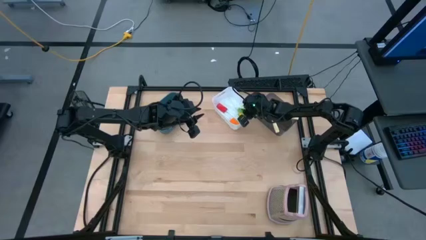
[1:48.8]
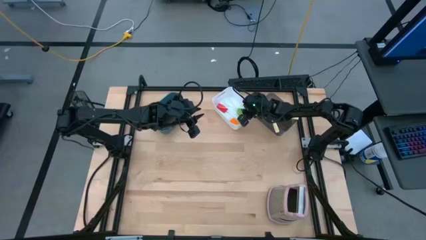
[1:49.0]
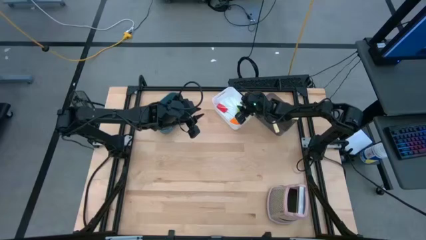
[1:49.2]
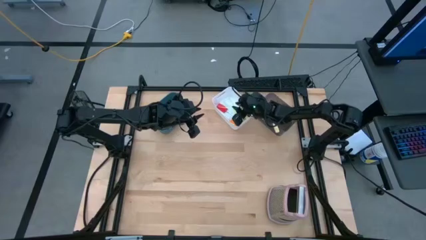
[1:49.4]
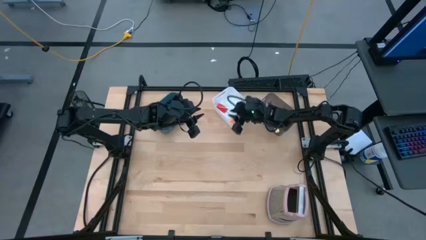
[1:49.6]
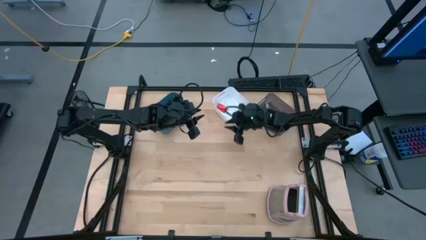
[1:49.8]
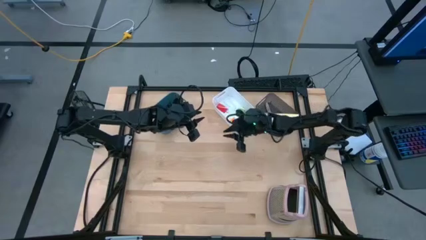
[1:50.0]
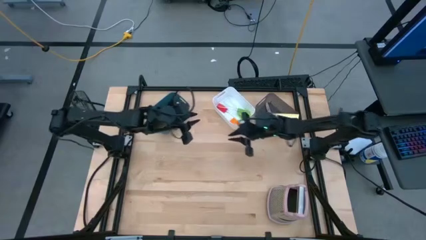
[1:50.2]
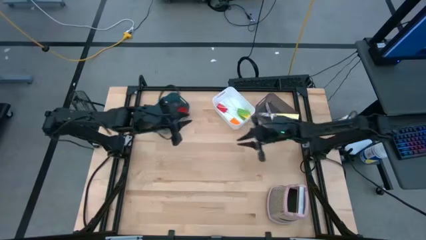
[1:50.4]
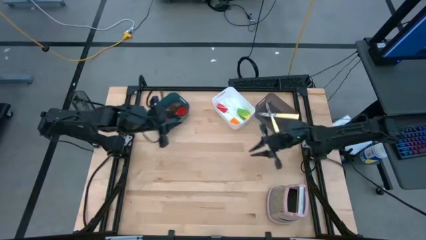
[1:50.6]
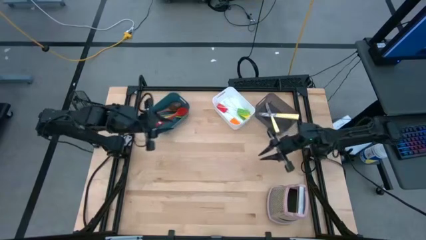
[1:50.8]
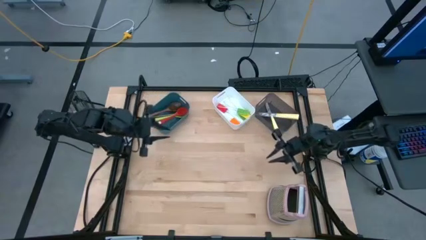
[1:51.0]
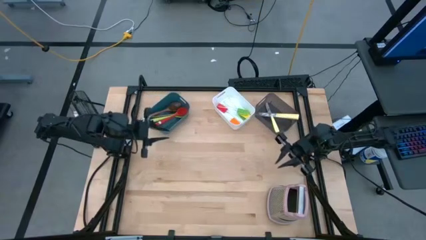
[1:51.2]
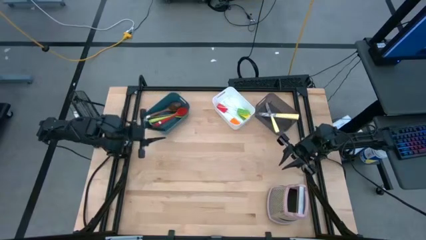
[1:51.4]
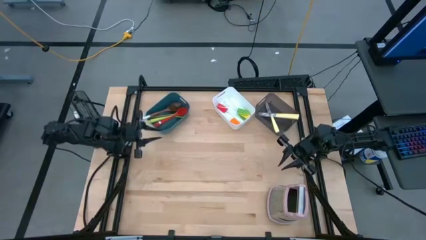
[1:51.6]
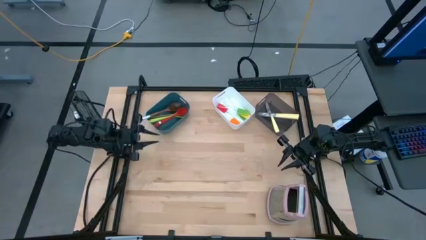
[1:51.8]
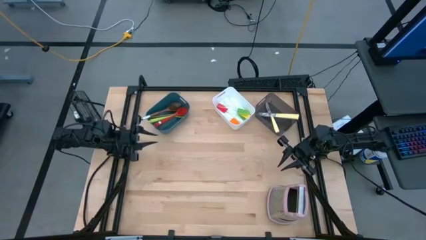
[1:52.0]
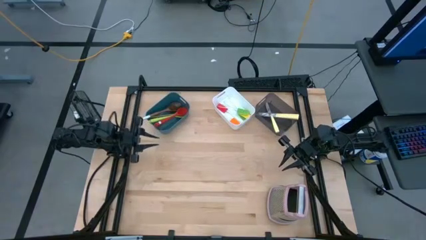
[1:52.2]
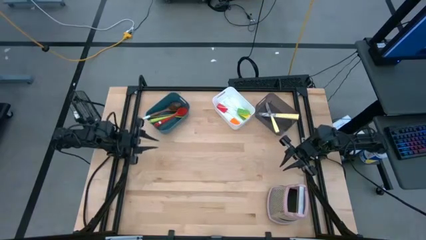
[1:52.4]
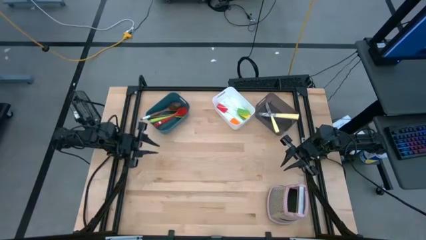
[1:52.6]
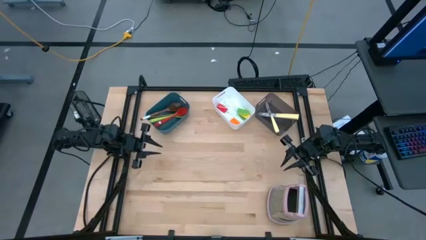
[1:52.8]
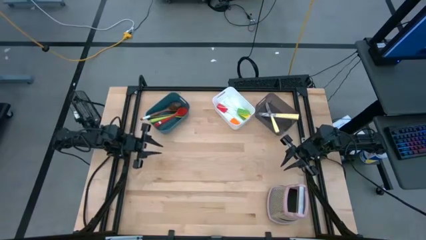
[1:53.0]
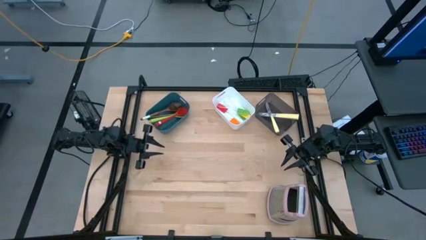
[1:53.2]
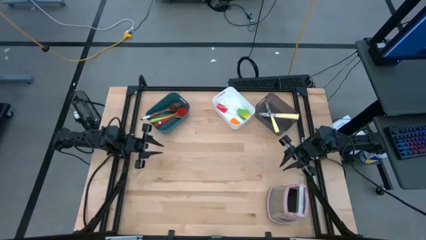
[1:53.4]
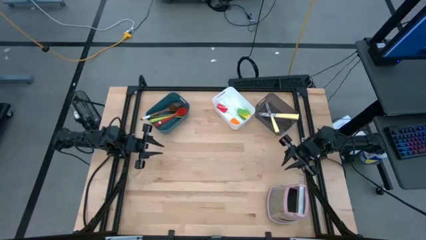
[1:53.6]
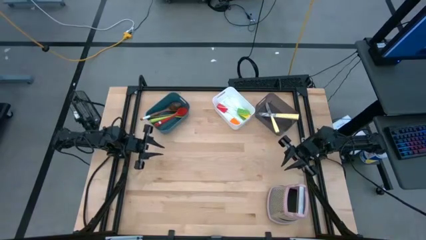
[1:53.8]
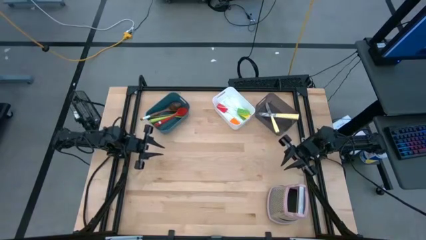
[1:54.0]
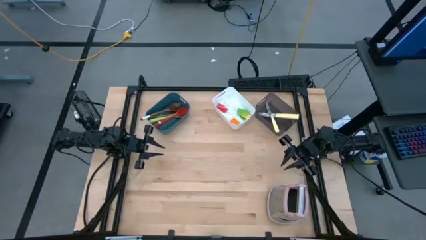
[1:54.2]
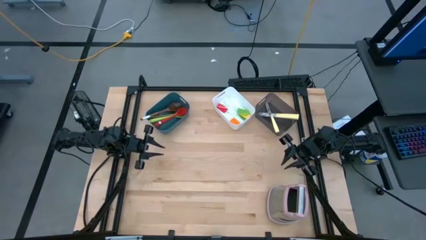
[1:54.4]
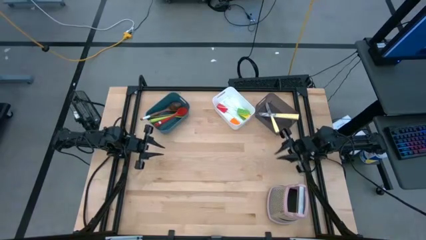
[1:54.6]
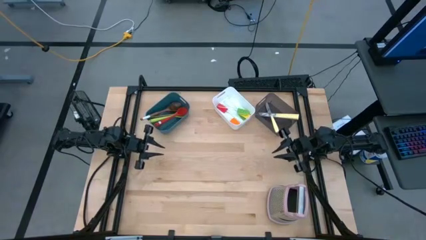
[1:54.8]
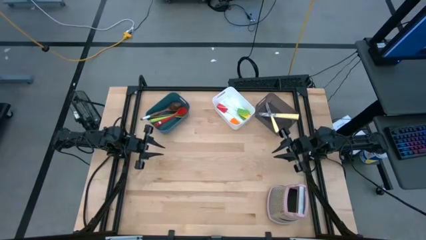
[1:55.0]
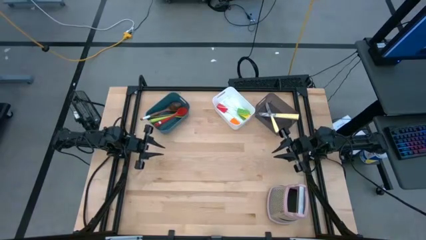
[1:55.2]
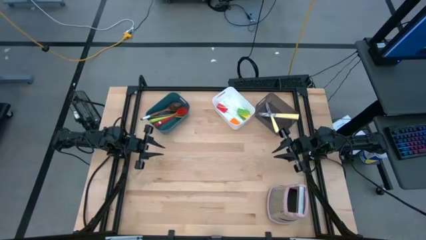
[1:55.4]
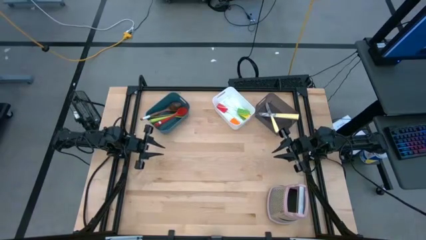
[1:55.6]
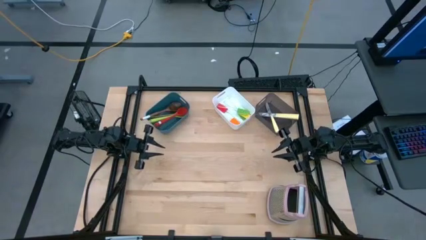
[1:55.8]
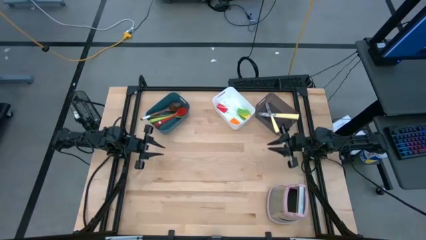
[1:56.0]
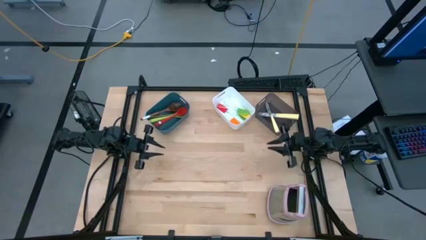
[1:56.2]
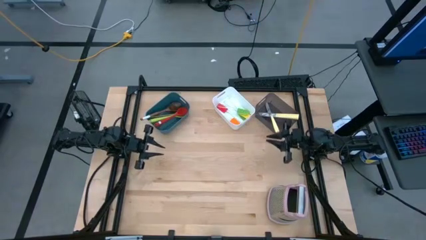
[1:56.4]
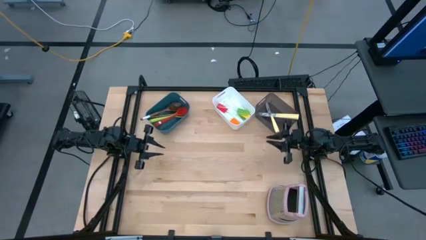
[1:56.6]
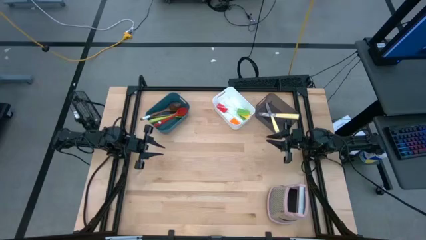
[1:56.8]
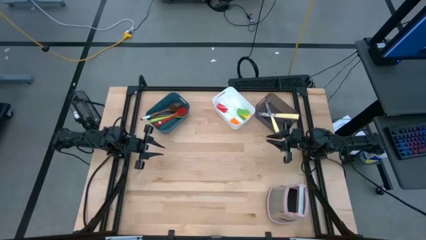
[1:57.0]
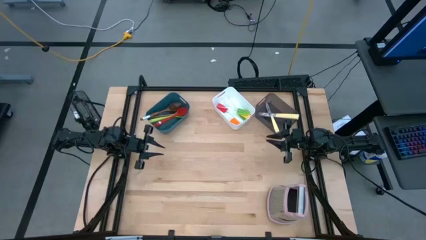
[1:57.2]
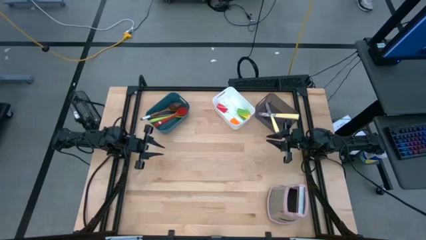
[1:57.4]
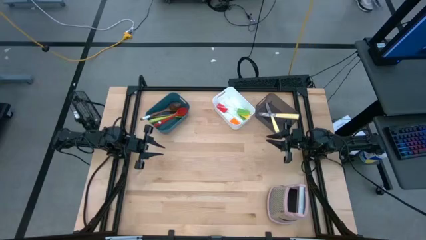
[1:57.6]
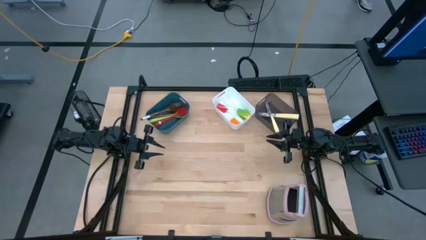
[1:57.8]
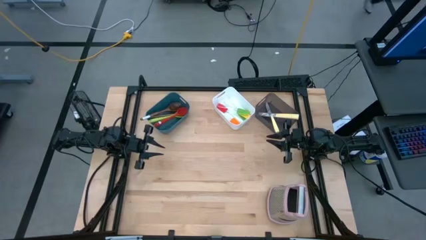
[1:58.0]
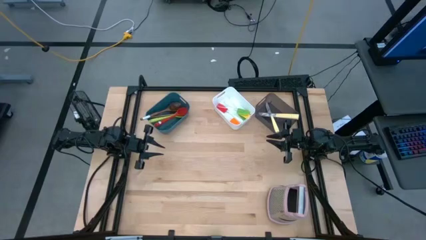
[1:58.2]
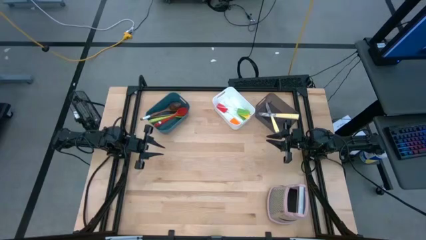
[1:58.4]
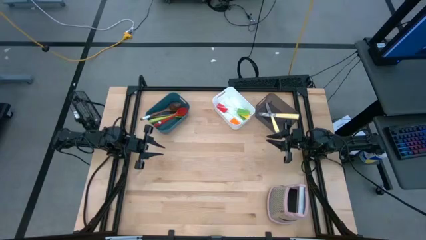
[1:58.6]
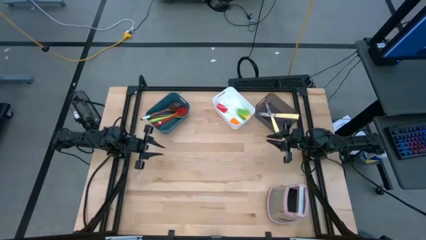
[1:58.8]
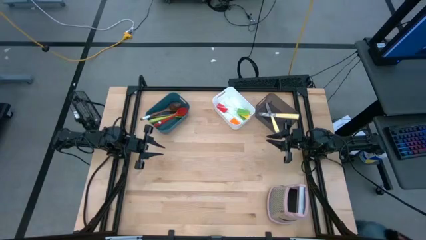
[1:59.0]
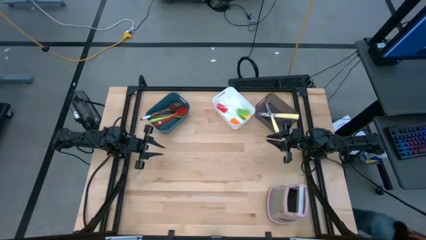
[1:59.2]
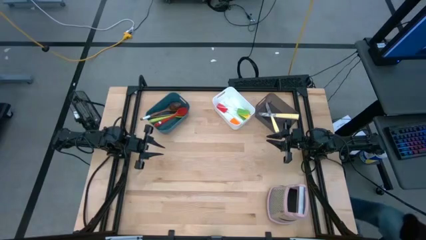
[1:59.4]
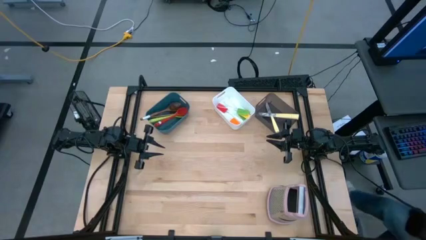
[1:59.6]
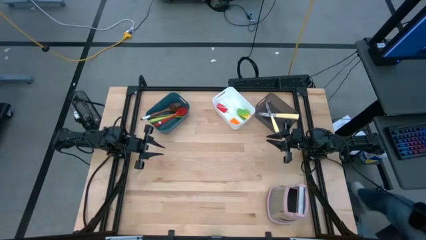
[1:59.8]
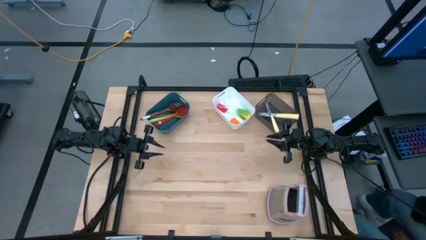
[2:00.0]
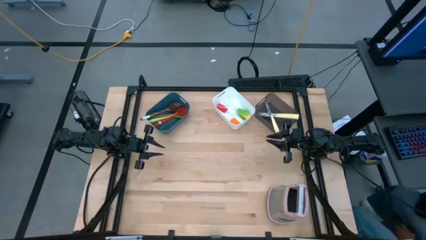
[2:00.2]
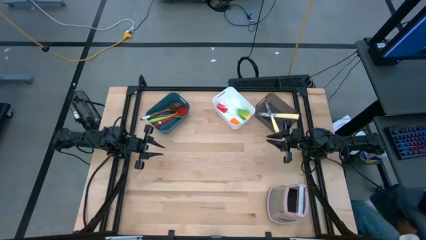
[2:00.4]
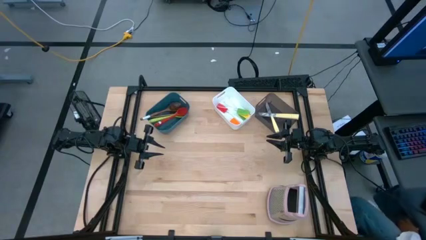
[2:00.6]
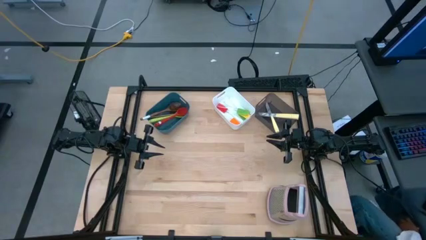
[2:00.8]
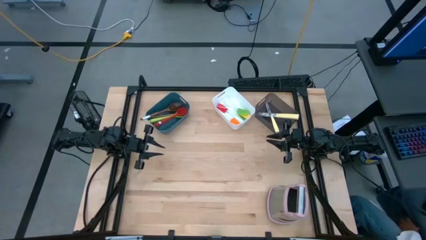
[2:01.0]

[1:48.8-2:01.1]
Task: Pick & Place Kitchen Items
Return to Home Position

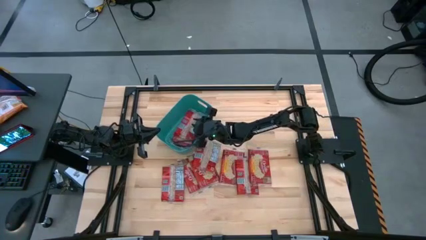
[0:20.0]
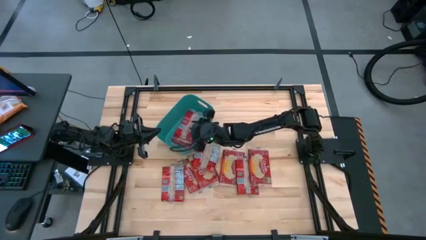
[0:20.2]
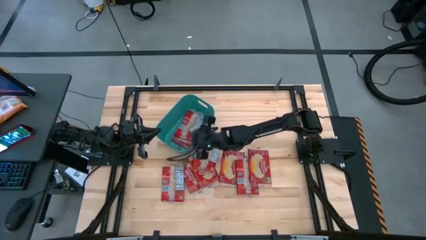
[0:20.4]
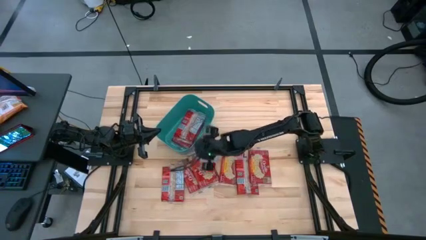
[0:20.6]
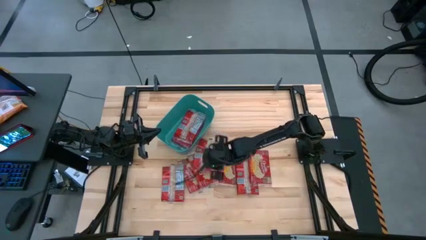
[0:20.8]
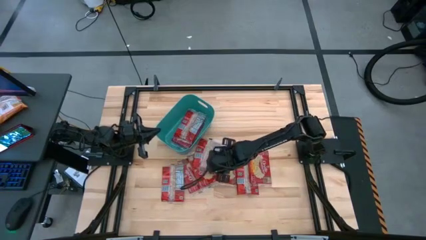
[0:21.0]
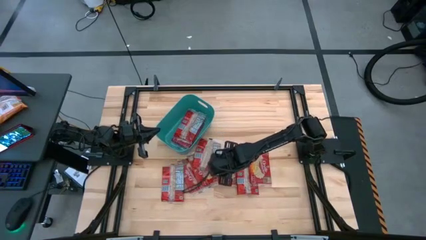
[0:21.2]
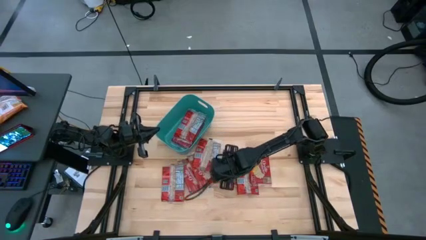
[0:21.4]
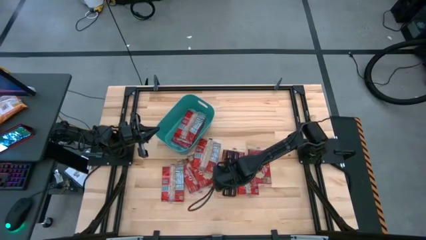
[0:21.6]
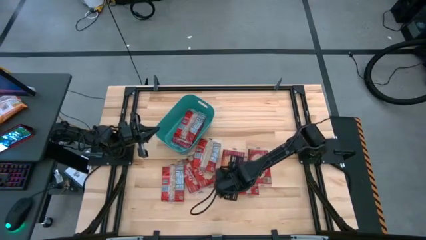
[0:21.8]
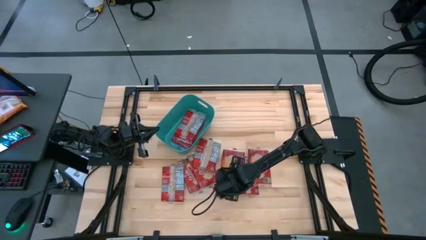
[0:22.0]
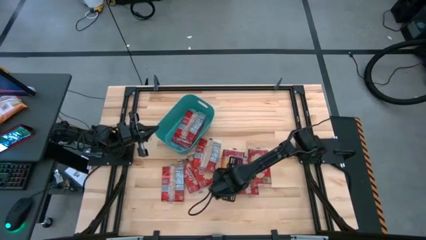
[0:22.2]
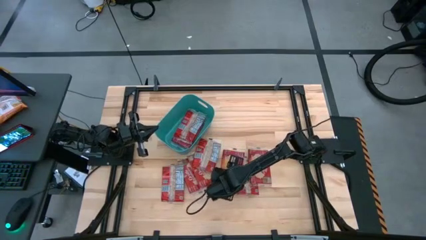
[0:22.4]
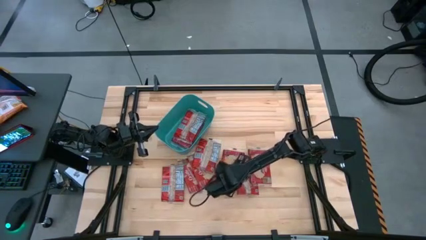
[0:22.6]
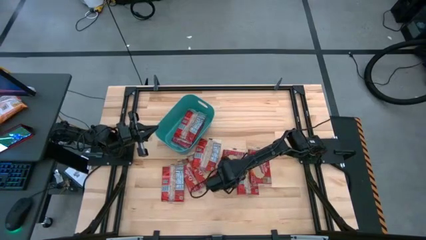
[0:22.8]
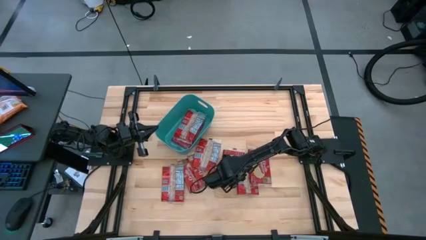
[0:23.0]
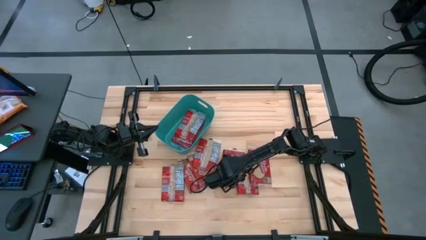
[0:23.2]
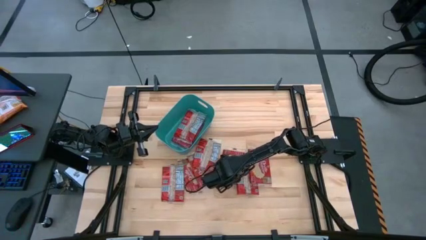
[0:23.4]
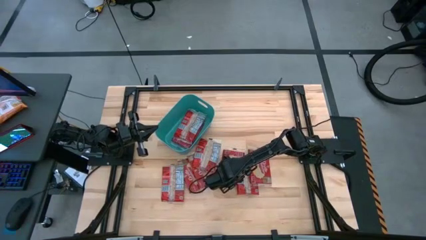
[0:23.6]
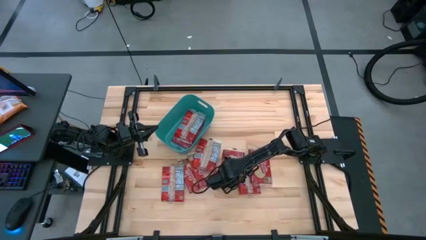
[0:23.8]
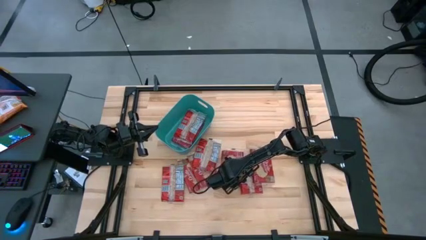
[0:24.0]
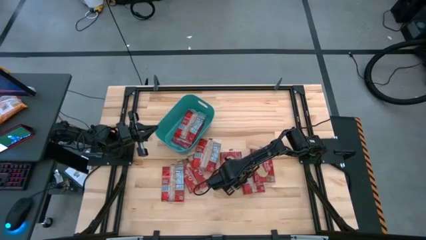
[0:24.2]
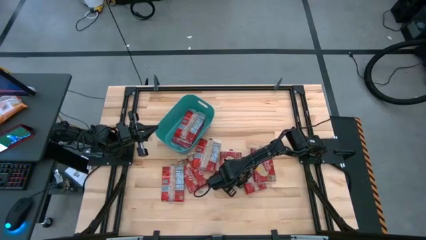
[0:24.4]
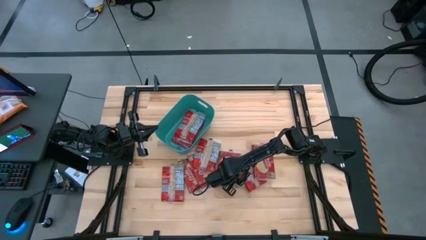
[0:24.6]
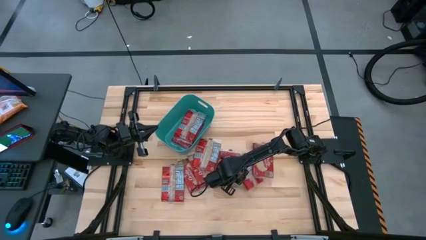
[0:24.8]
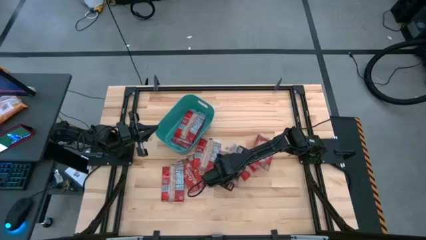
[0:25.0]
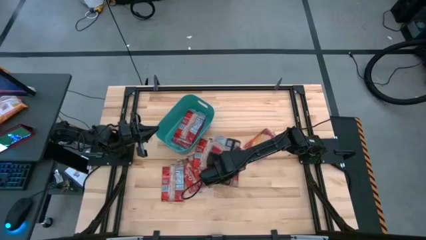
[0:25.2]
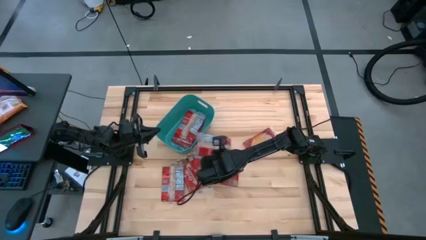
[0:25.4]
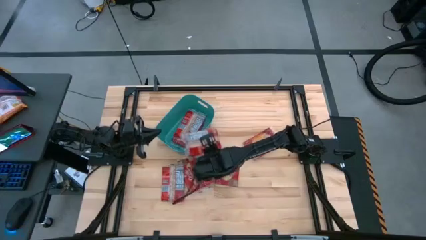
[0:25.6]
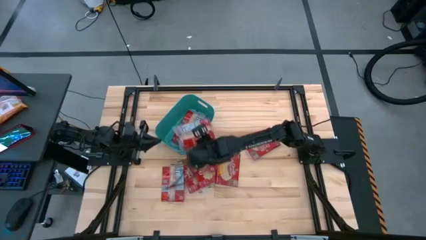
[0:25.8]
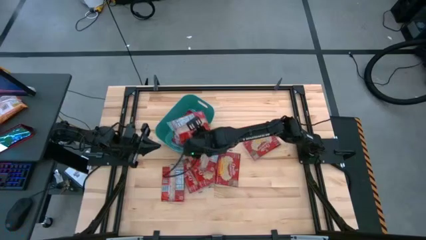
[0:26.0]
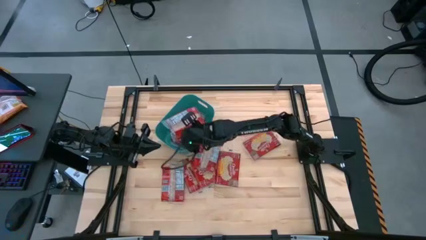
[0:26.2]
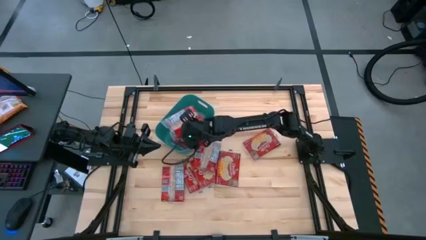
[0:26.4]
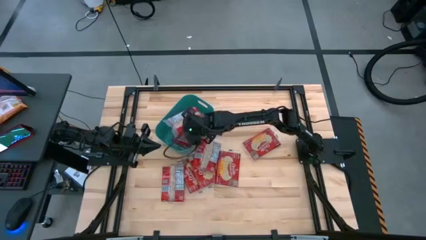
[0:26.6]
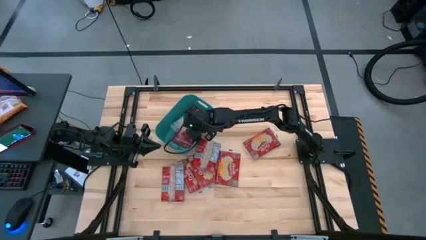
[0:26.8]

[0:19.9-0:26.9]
Task: Sort popcorn bags into baskets
Put the red popcorn bag into the blue bin
